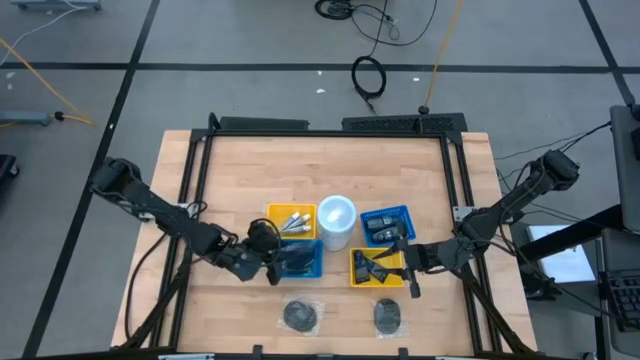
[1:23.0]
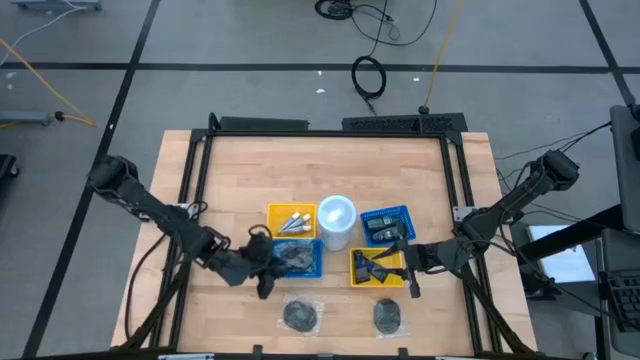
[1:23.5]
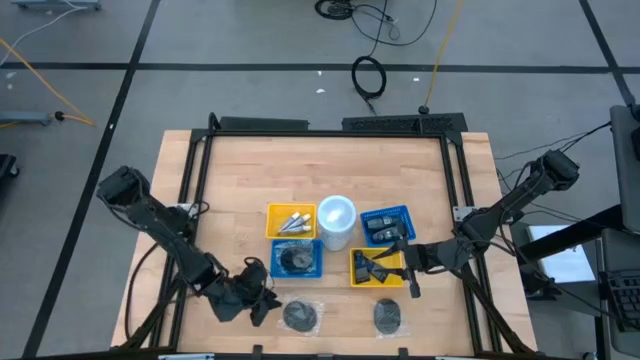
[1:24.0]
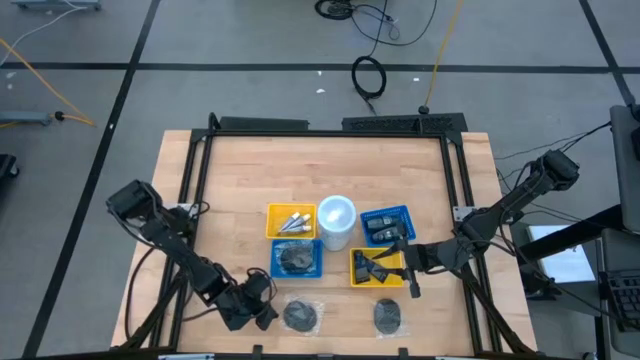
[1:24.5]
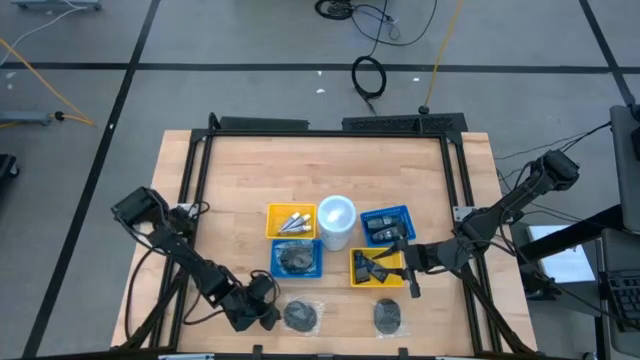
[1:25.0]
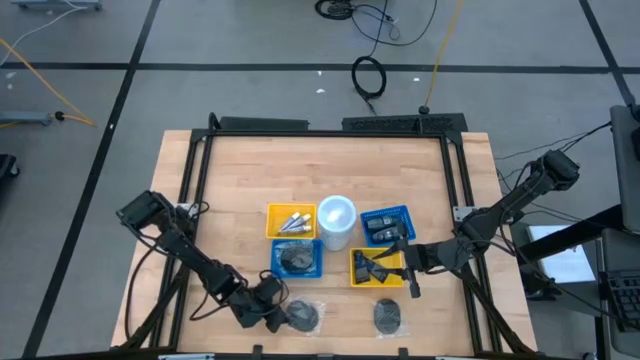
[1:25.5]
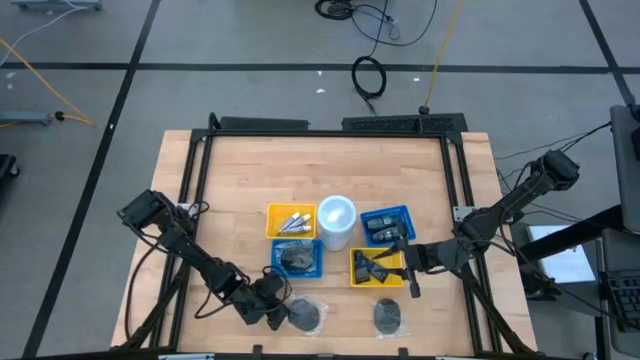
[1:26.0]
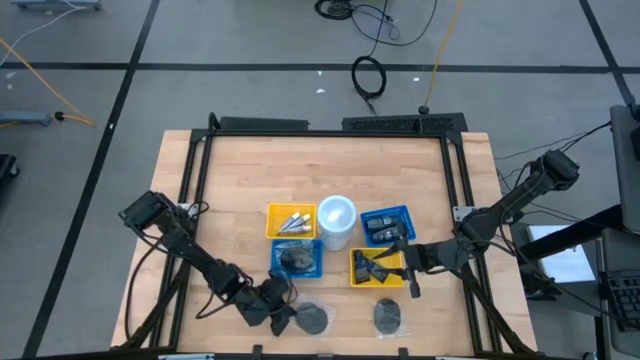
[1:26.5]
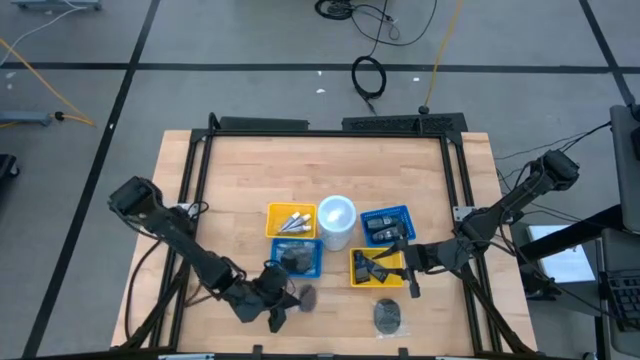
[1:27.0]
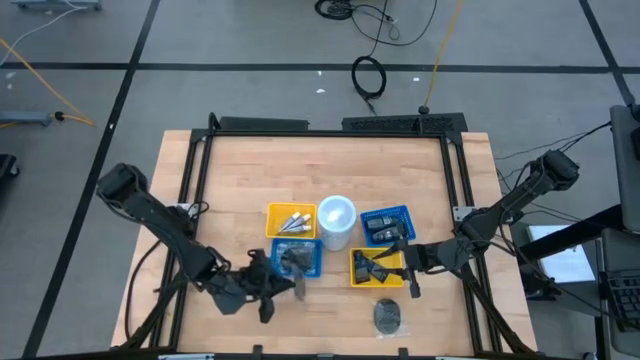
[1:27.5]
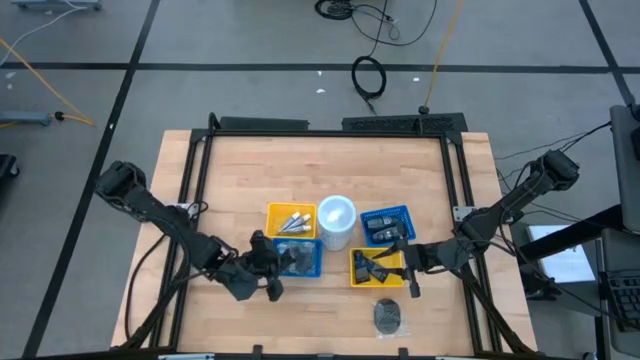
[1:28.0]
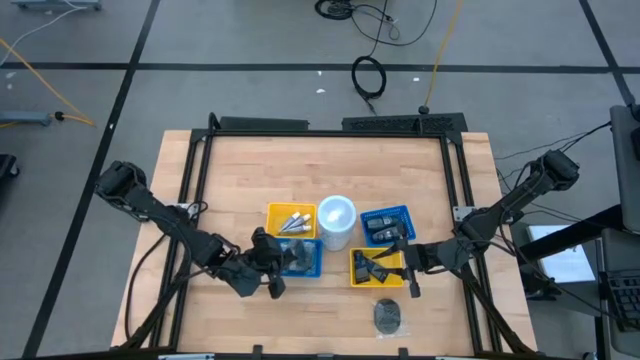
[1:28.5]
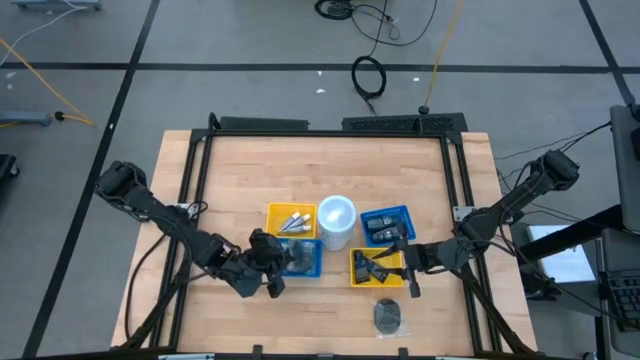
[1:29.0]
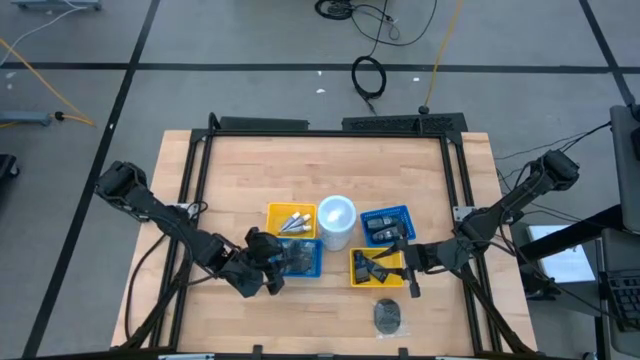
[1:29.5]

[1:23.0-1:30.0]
Task: Pick & Place Travel size toiletries
Put the black hairbrush into the bottom blue bin

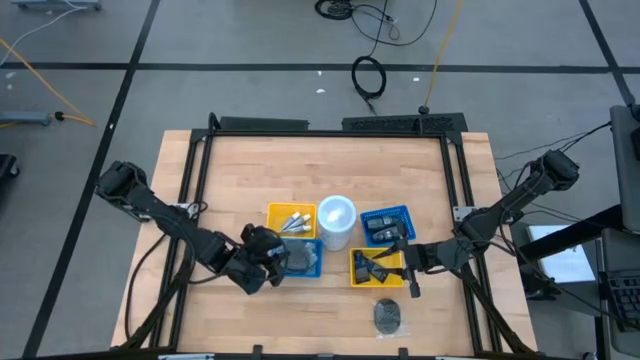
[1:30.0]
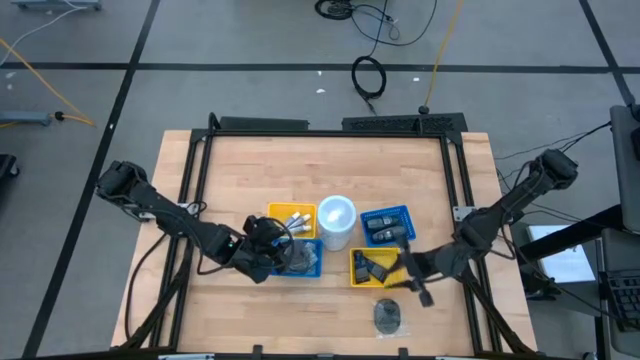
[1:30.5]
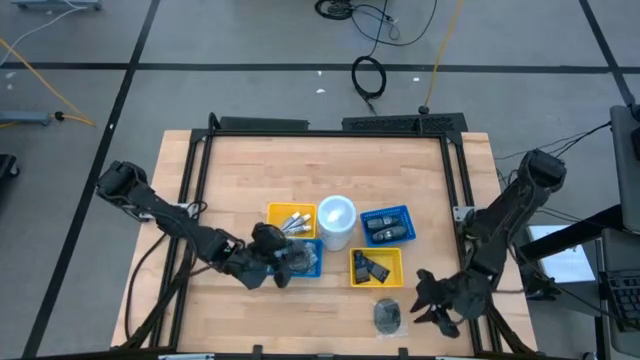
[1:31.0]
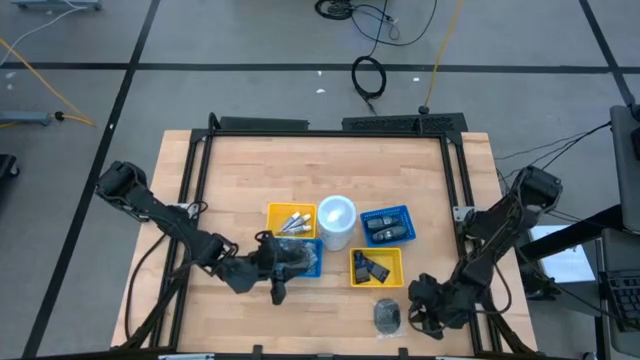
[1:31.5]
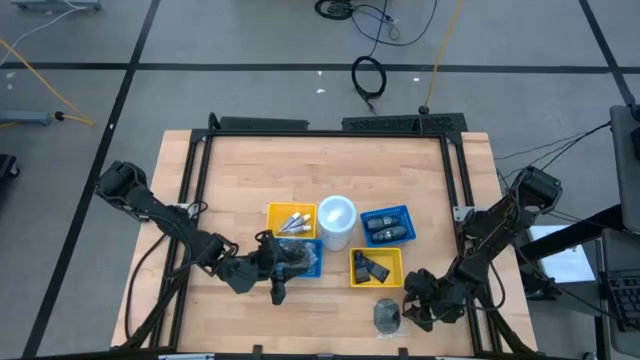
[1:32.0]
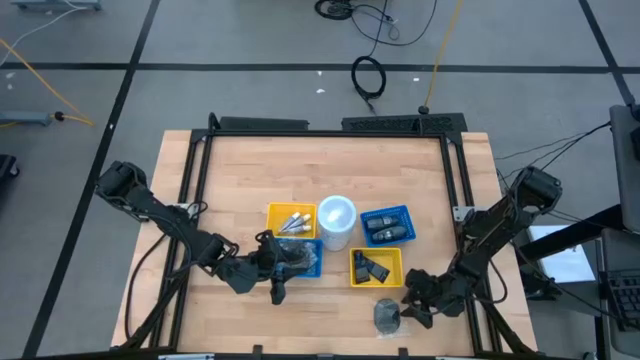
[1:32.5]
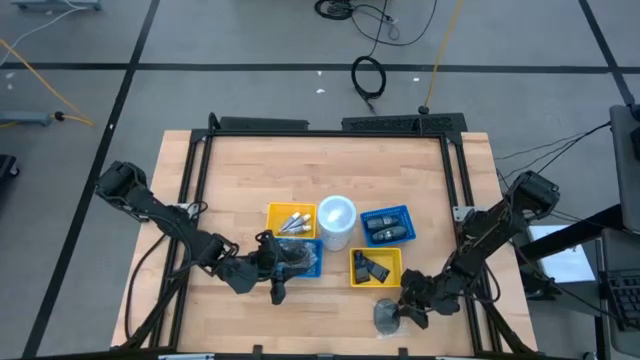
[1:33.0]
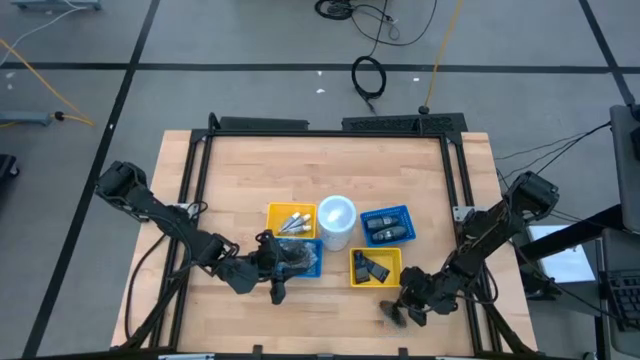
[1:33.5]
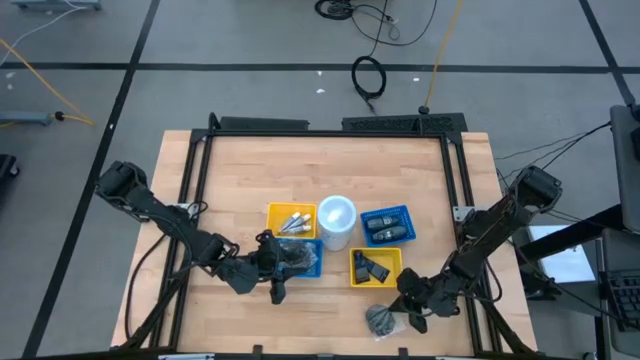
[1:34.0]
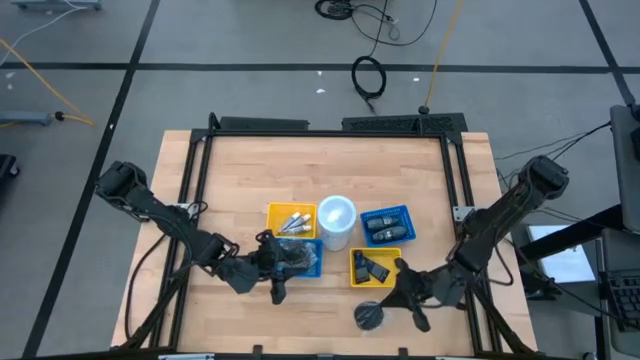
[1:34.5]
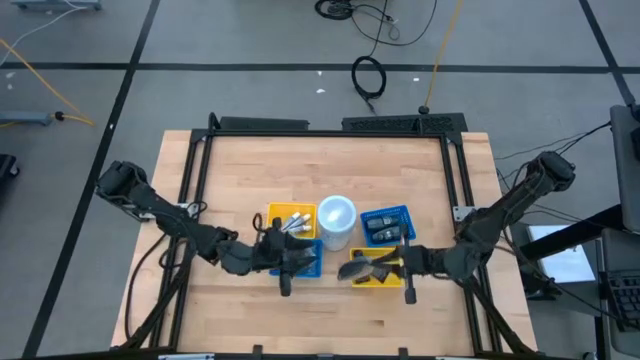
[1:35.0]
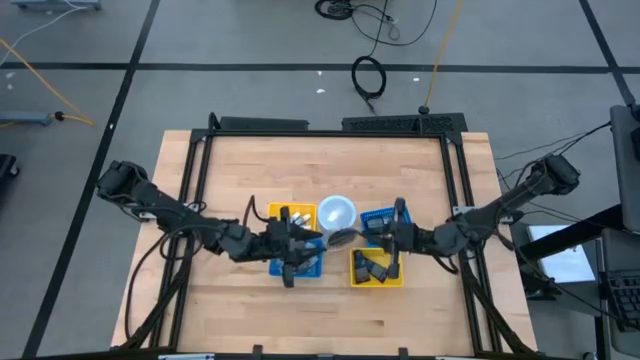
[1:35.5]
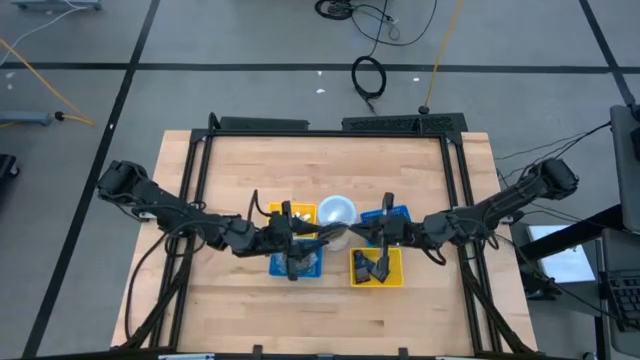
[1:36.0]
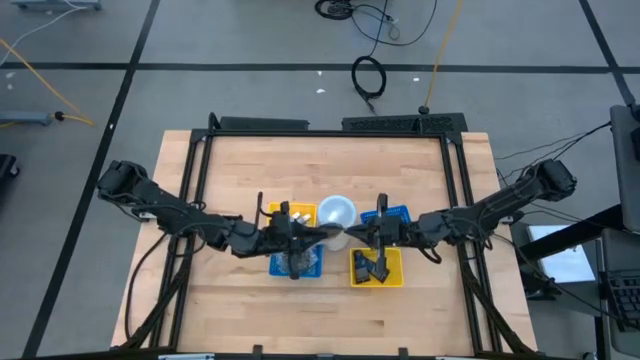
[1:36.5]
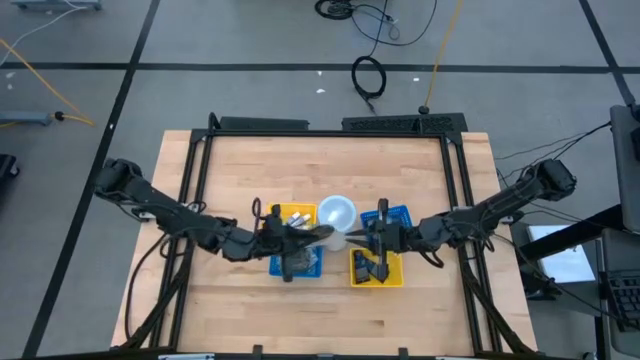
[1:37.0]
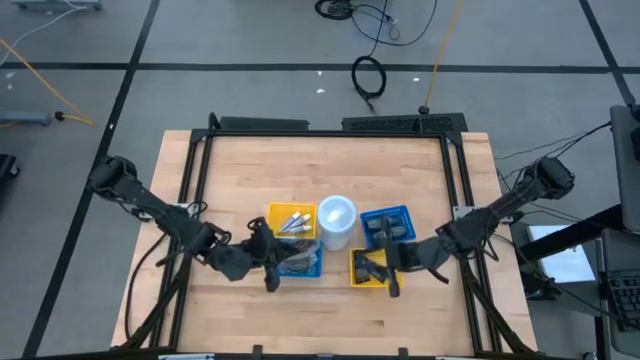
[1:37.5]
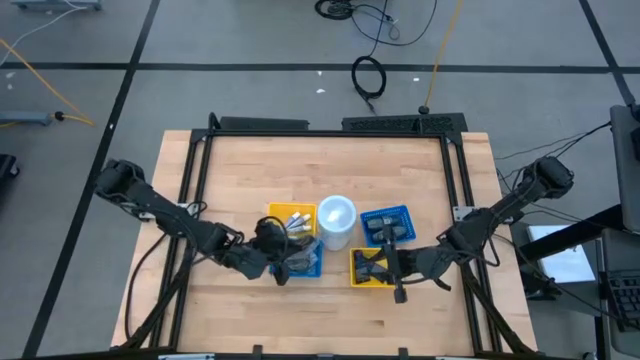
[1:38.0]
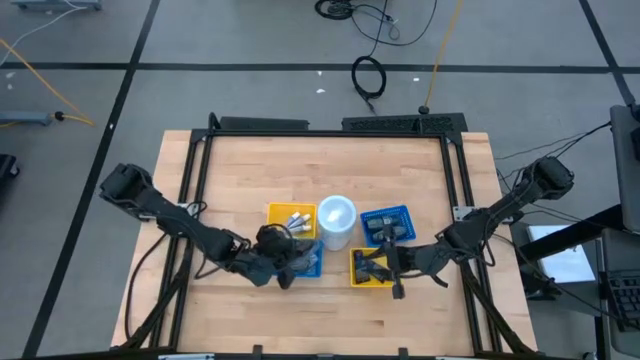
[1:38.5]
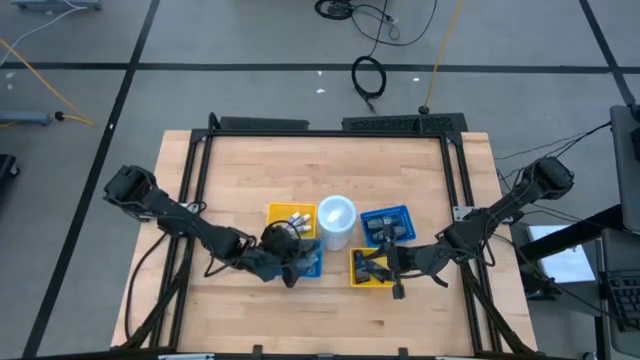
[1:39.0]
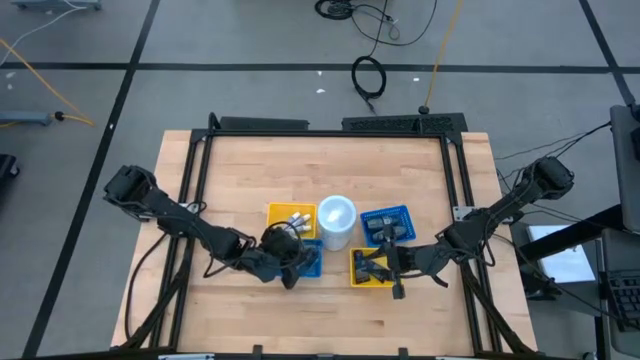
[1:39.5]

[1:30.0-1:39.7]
Put the black hairbrush into the bottom blue bin

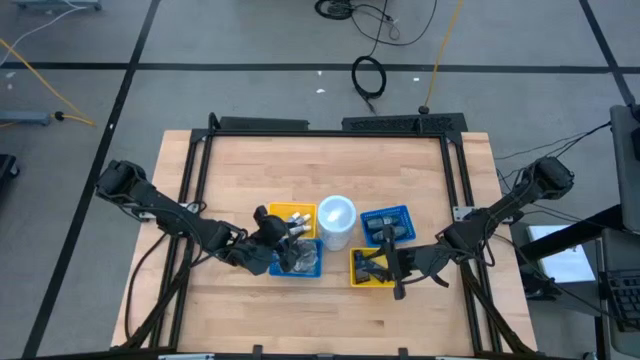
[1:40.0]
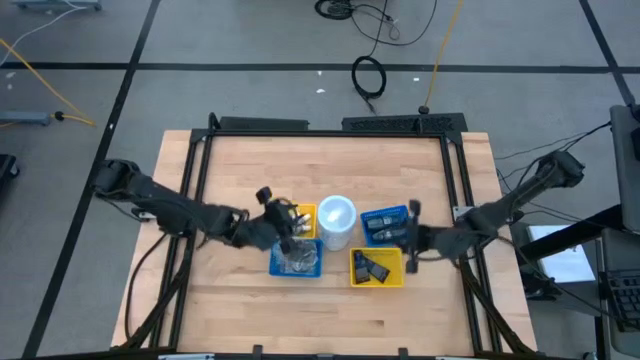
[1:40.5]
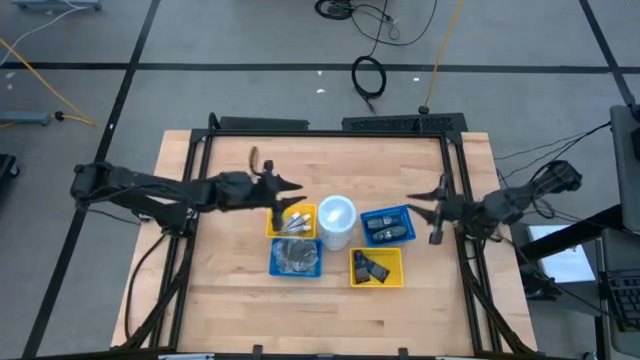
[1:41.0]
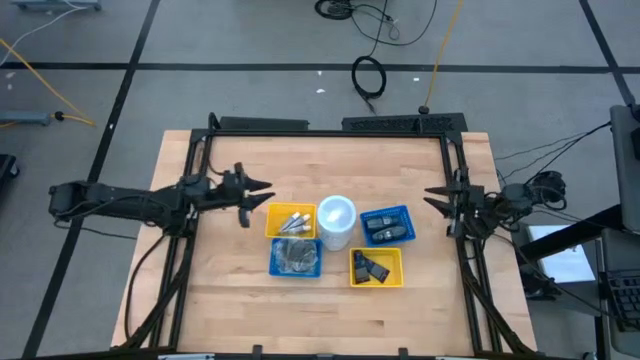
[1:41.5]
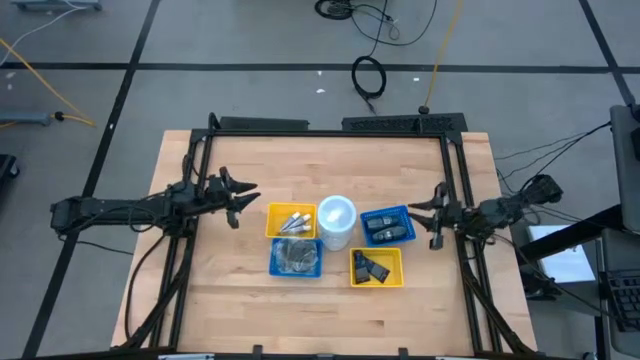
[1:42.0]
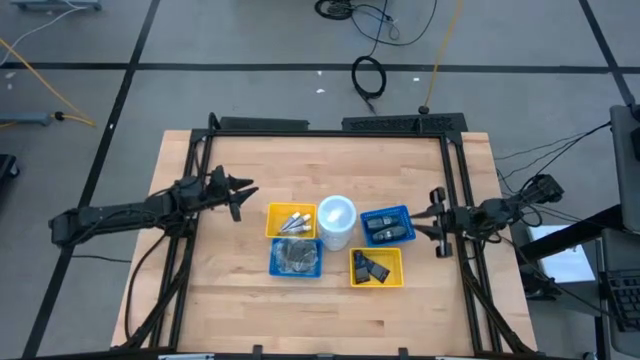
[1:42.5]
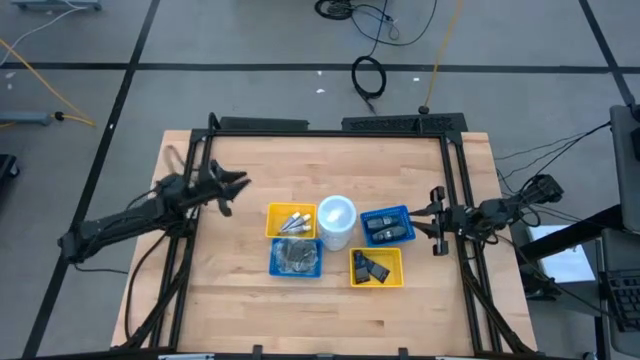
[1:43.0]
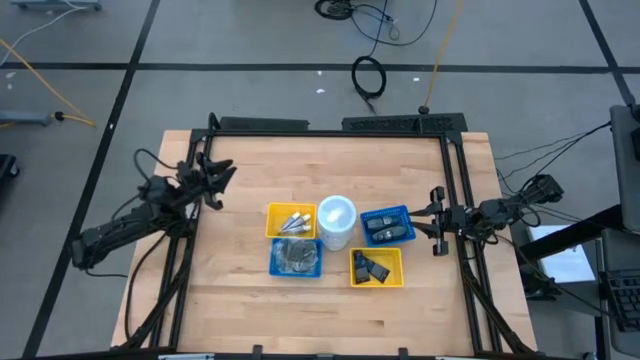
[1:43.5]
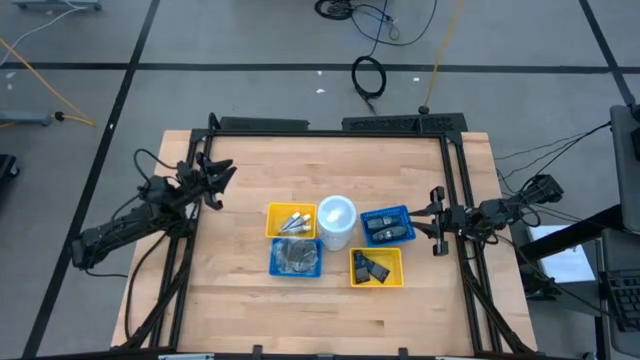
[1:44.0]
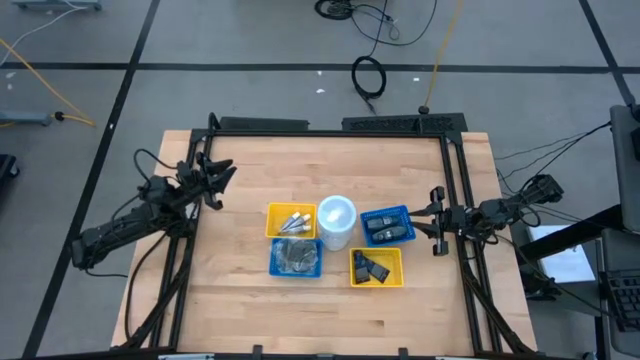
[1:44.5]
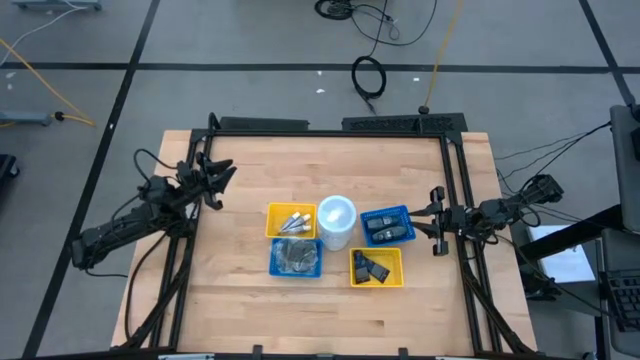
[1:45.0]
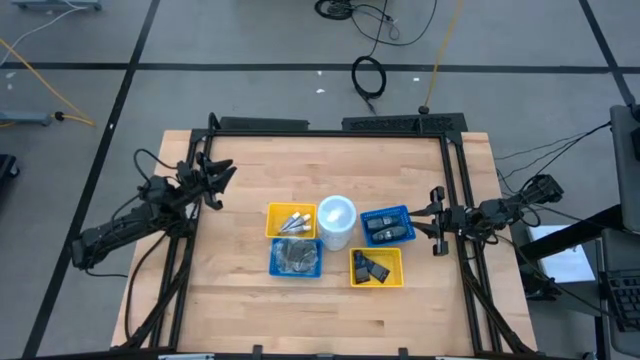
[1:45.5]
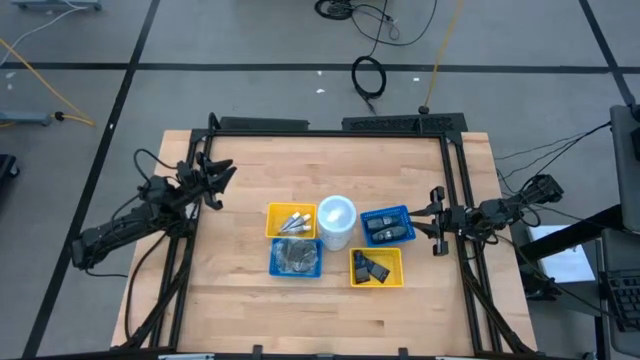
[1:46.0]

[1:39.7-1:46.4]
Return to Home Position
